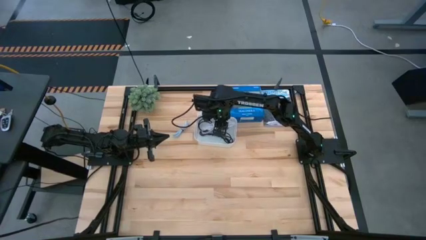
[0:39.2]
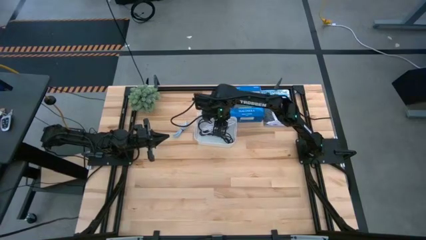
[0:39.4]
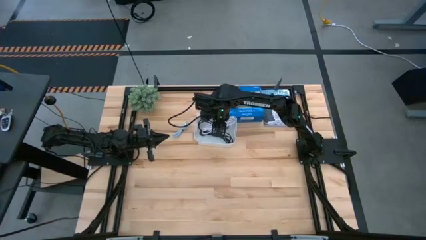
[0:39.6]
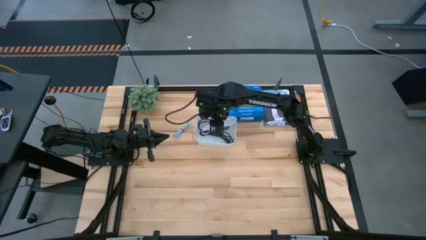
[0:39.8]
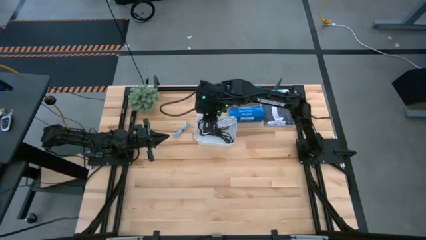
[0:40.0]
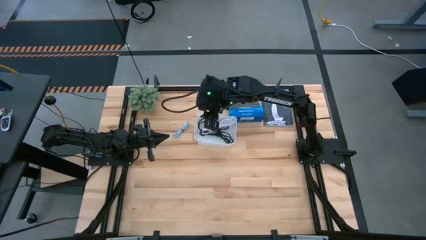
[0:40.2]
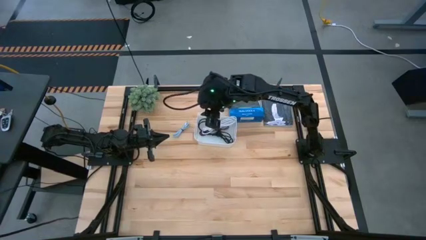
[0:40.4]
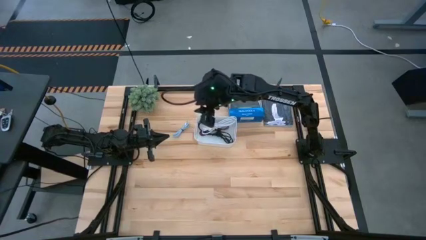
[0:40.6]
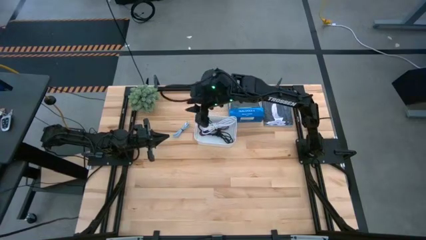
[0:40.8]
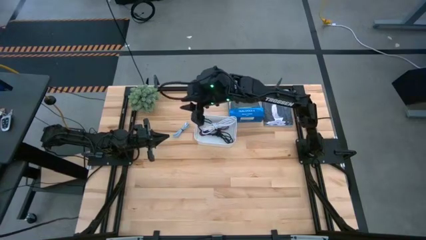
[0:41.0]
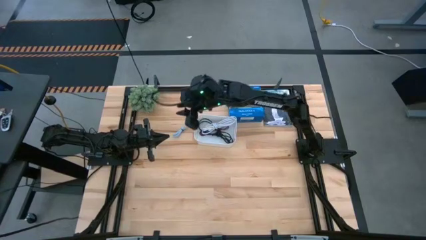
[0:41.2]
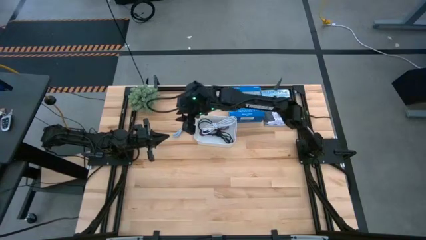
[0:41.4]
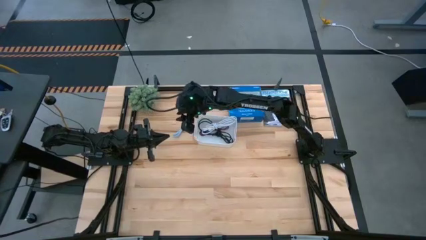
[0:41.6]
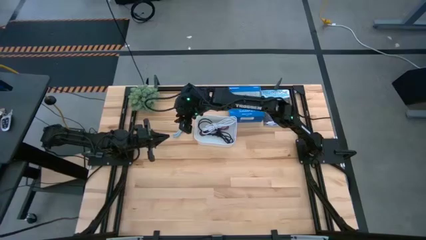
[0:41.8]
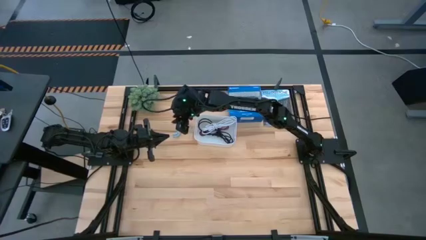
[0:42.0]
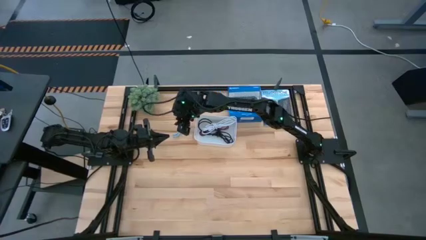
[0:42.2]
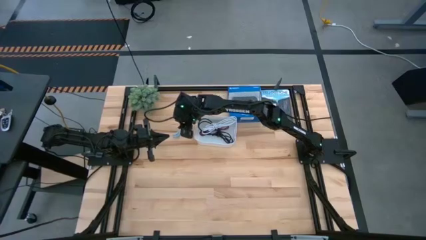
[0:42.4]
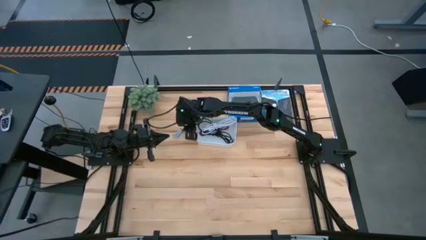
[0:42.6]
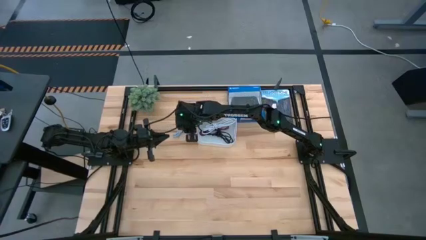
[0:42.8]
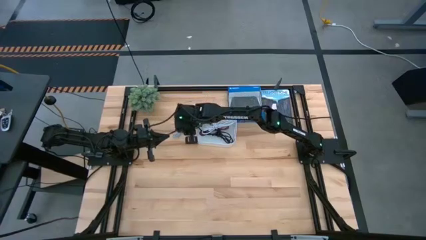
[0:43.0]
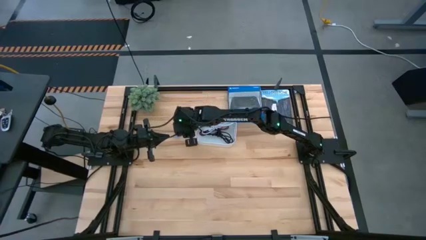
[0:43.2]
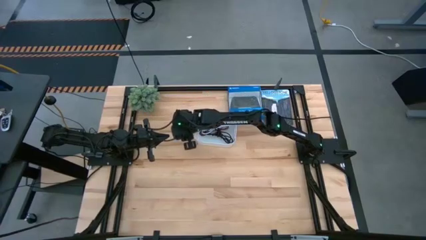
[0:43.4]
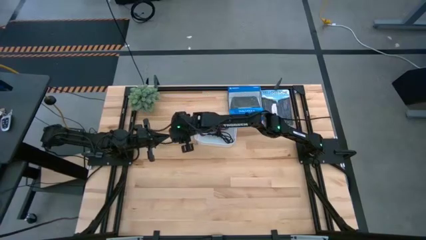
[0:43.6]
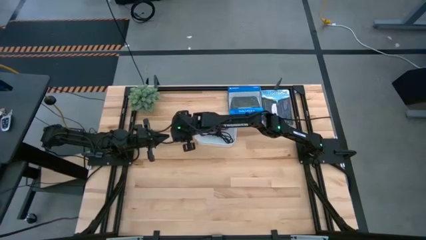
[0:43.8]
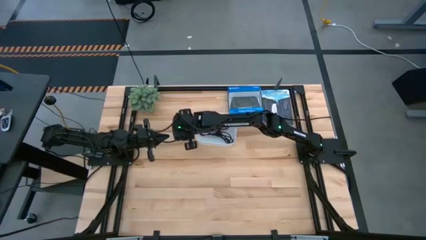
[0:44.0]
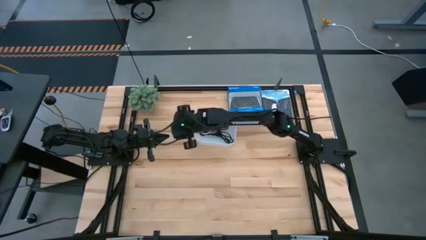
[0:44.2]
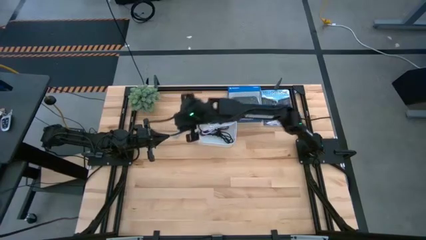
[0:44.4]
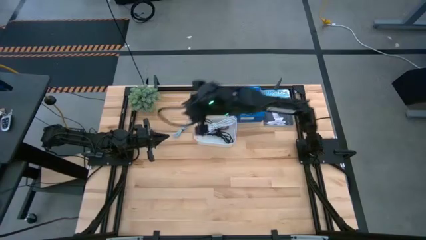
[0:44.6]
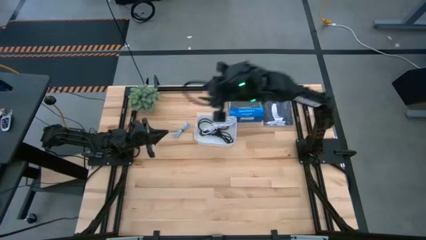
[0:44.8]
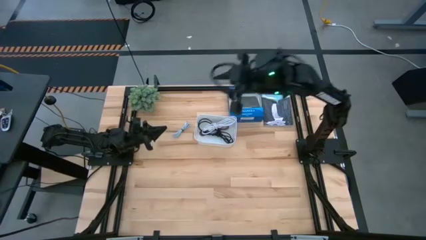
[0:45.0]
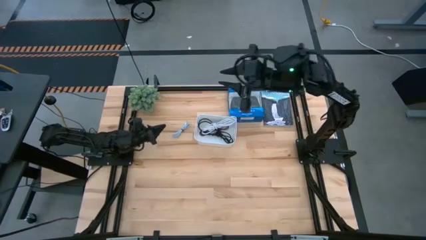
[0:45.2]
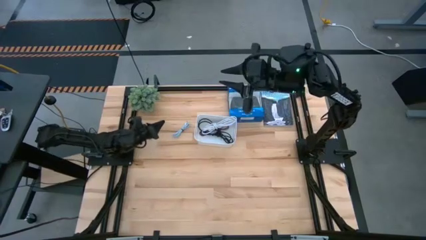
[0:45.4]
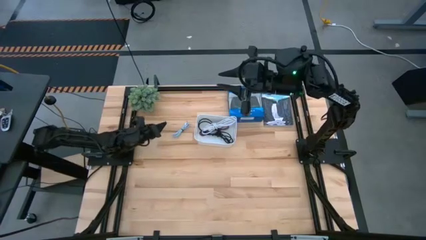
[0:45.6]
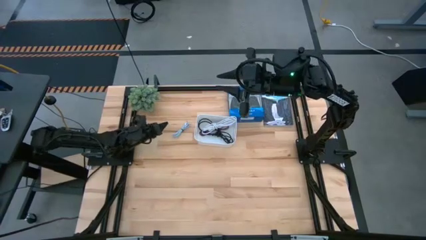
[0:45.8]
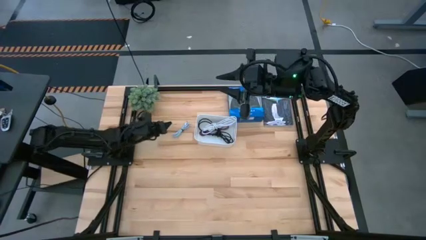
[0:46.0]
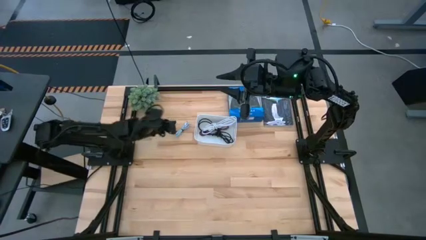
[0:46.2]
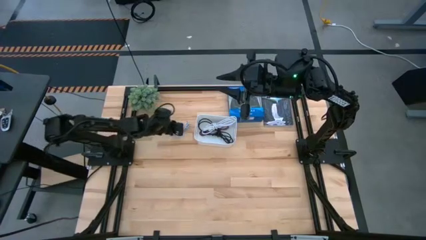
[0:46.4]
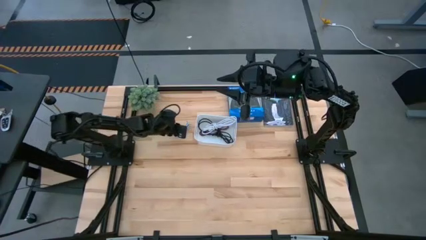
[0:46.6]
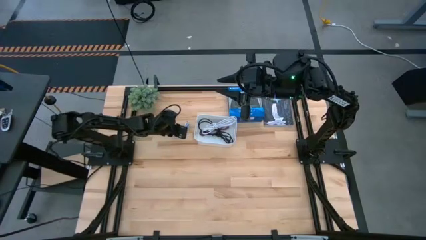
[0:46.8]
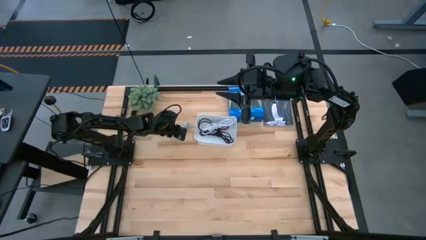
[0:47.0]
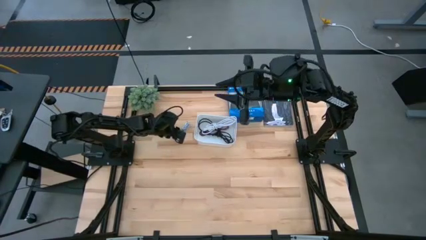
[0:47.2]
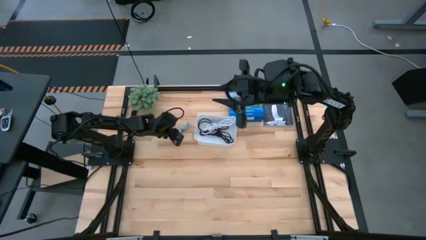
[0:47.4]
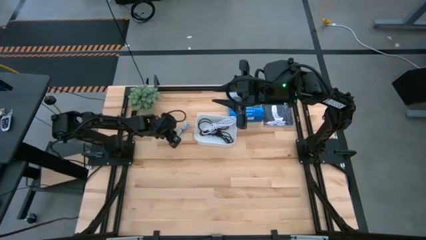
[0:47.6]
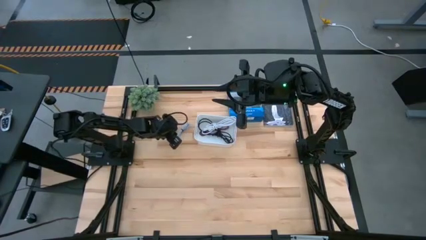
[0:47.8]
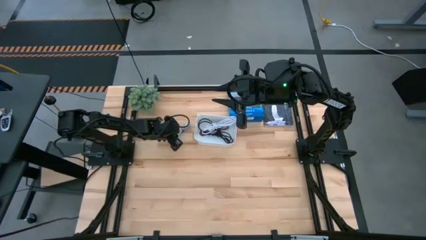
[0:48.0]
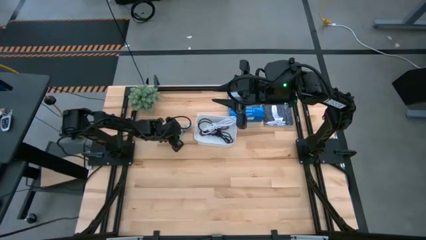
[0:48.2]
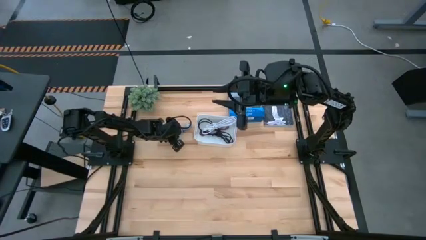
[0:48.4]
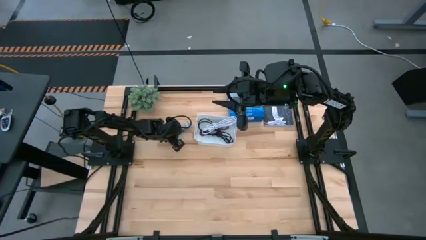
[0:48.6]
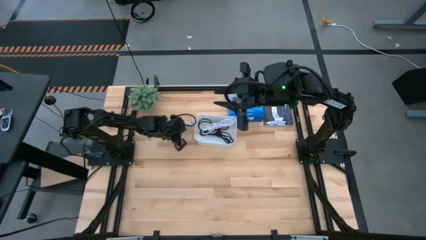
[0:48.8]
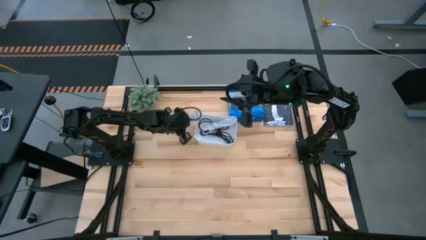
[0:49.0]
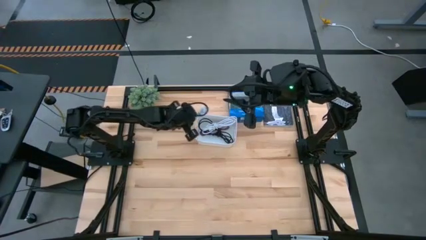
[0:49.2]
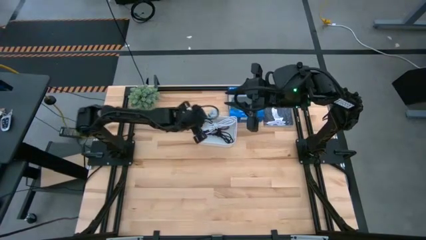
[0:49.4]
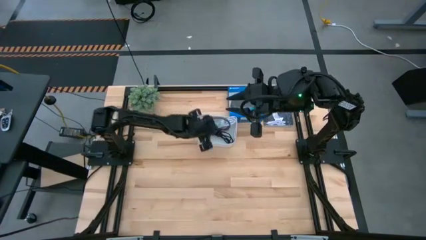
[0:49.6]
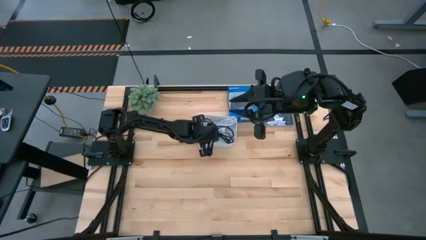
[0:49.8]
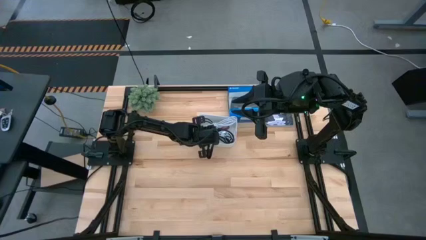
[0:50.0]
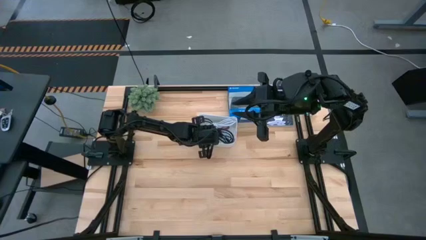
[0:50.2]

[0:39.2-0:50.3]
Task: Pick and place USB-C Cables
Put the light blue charger cable into the white bin

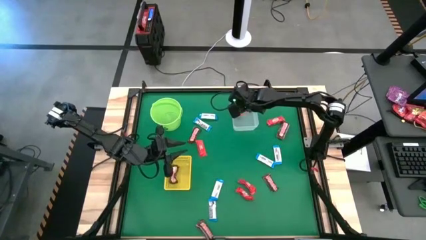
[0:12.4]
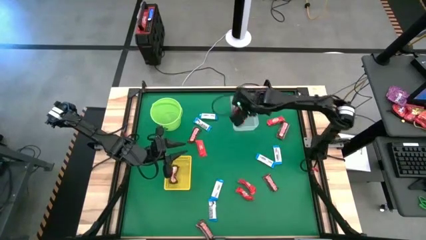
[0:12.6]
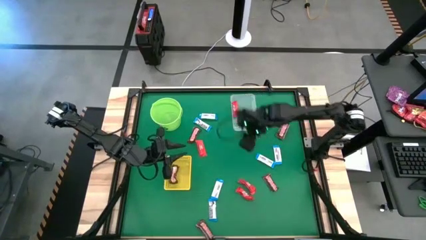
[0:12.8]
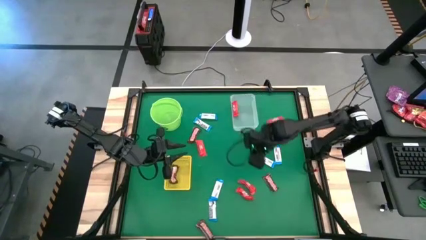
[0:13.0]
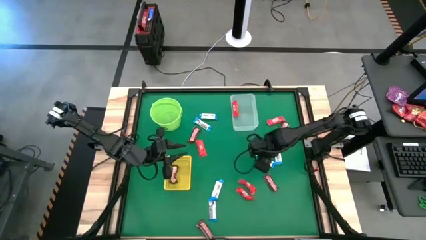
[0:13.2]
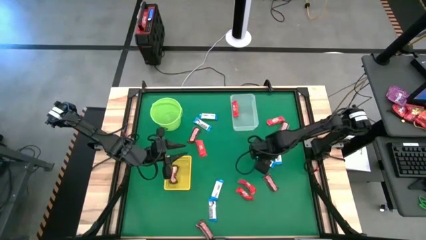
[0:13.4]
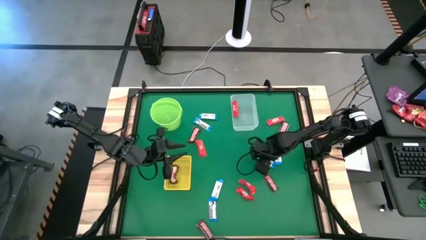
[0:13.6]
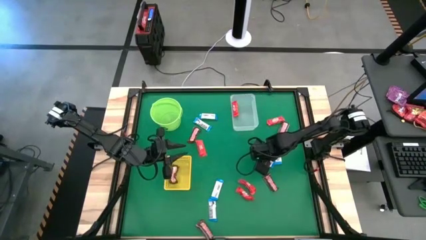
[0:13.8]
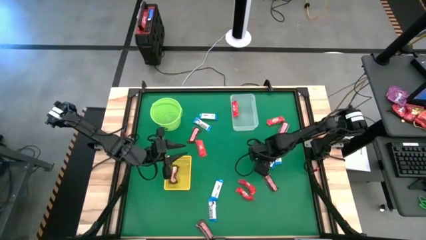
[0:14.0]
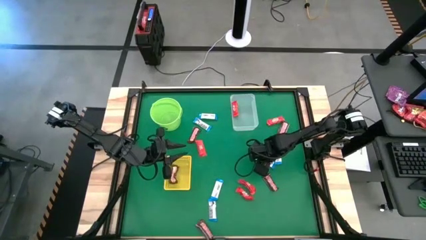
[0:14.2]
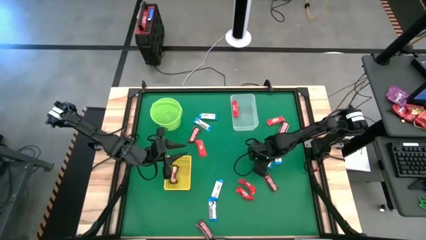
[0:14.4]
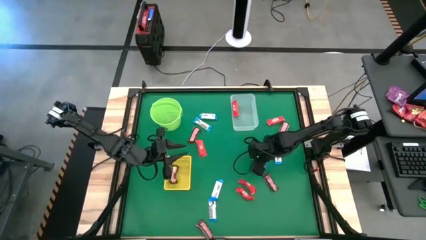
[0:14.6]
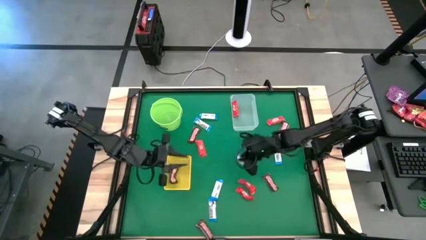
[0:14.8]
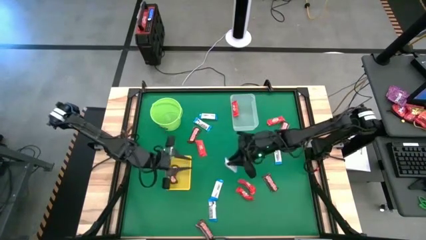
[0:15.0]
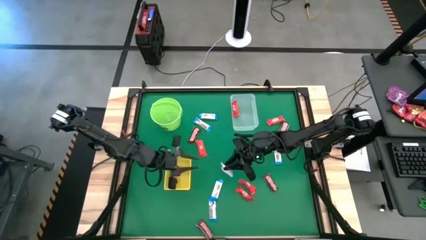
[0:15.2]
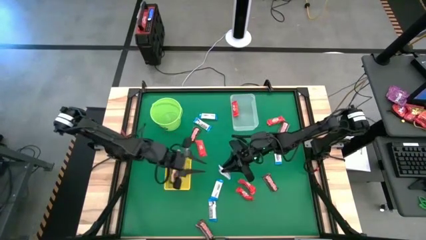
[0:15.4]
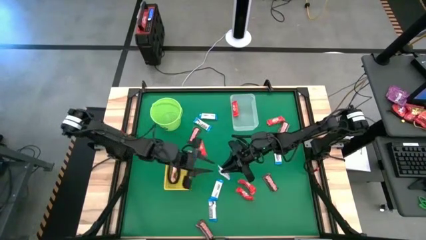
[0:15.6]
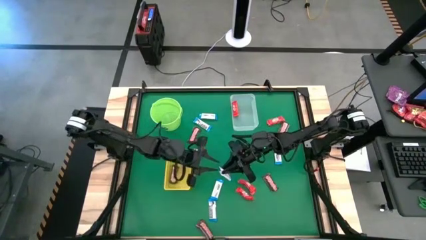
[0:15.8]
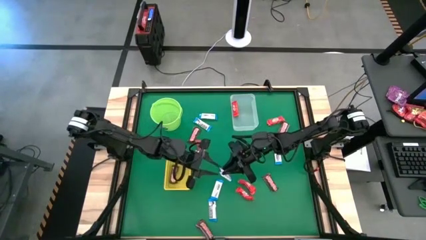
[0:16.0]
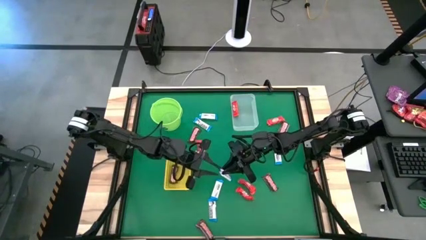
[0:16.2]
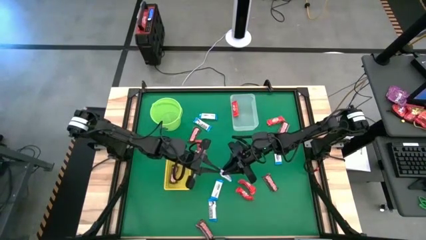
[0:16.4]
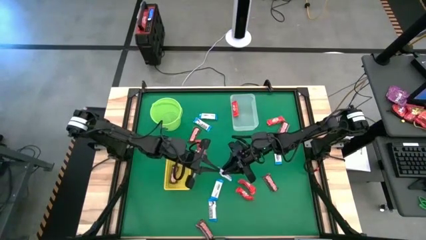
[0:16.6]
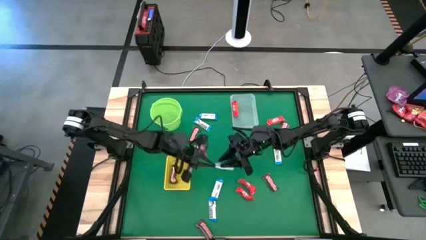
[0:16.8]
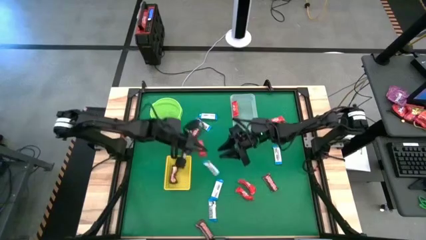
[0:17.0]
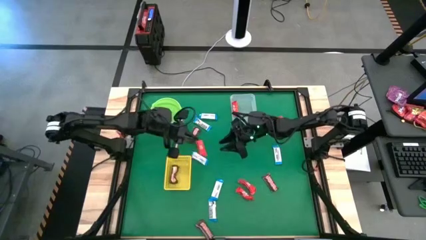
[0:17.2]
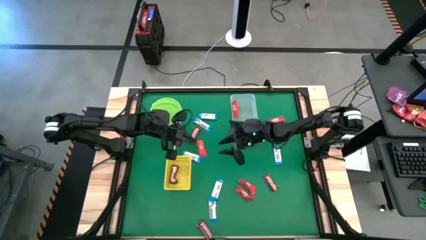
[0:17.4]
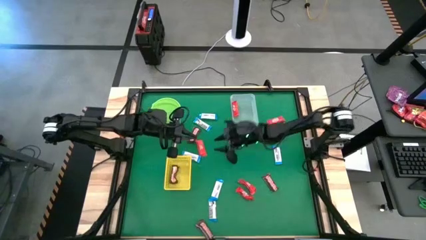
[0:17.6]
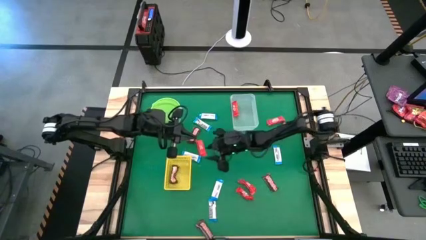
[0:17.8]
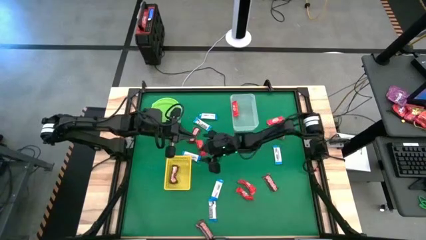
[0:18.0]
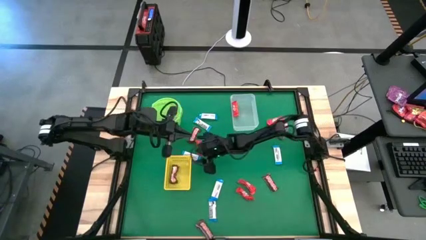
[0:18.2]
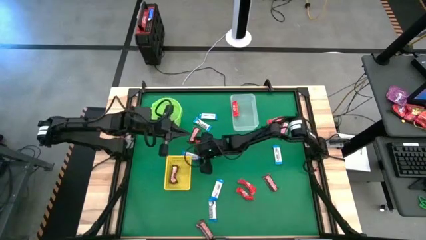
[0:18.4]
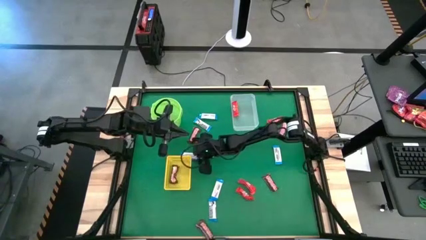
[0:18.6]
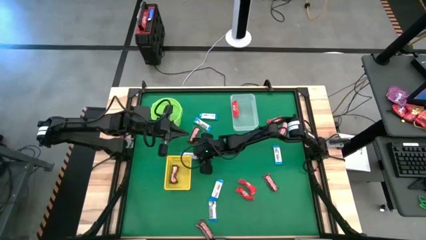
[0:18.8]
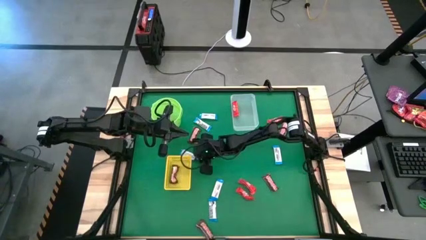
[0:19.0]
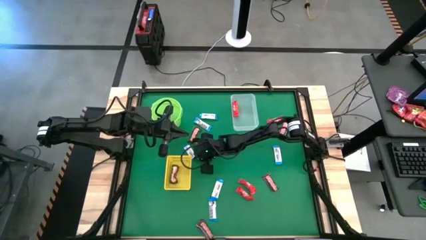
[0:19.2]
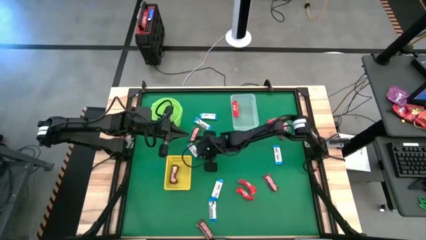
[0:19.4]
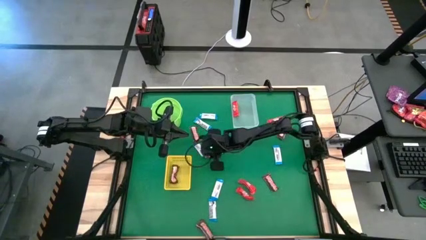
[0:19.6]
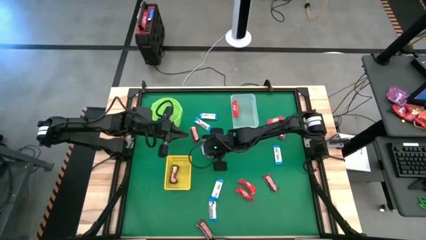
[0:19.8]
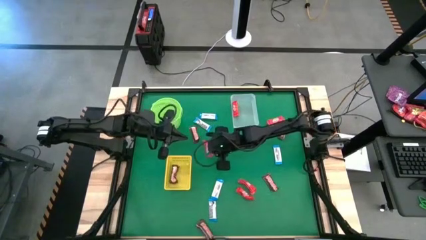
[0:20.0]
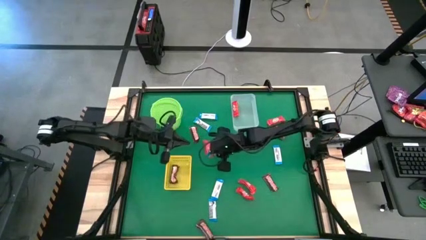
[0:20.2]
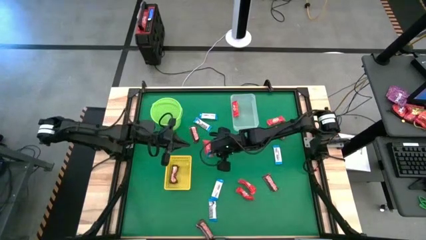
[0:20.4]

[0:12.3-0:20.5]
Task: Sort candy by brand, put in halloween buckets
Put the white chocolate into the green bucket
